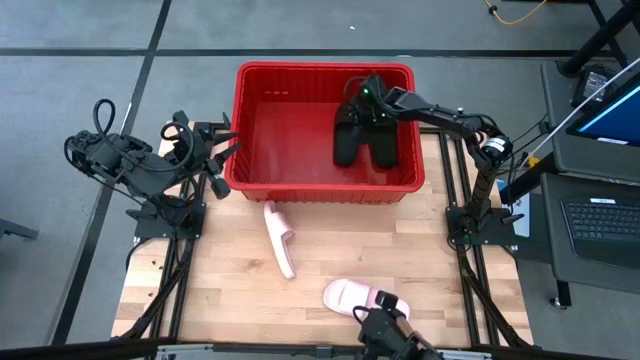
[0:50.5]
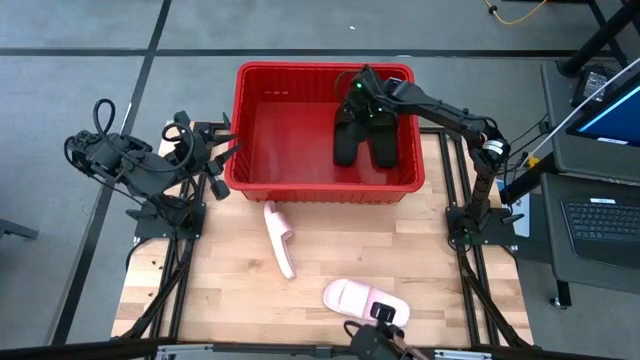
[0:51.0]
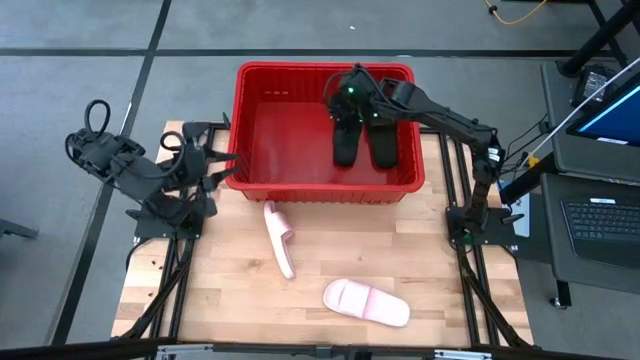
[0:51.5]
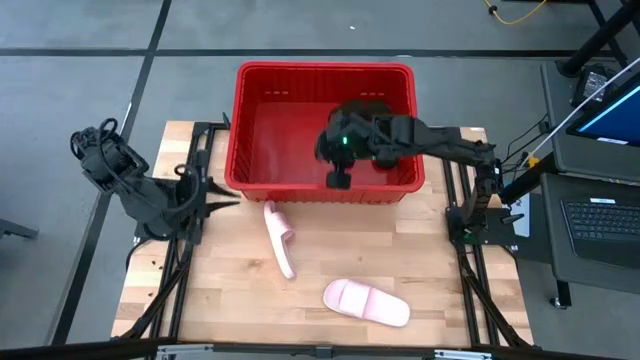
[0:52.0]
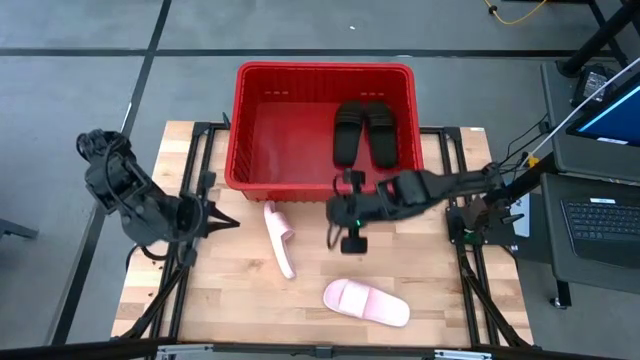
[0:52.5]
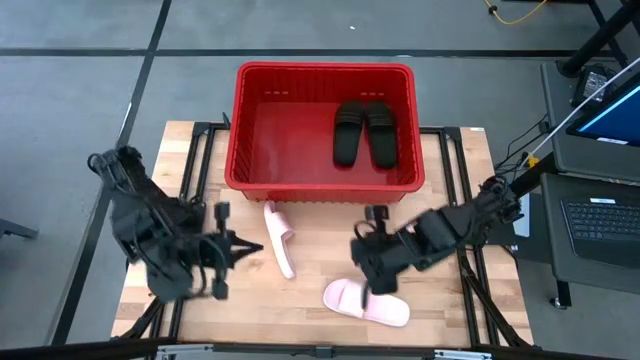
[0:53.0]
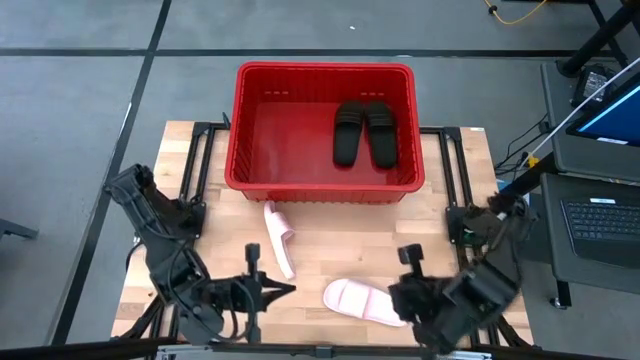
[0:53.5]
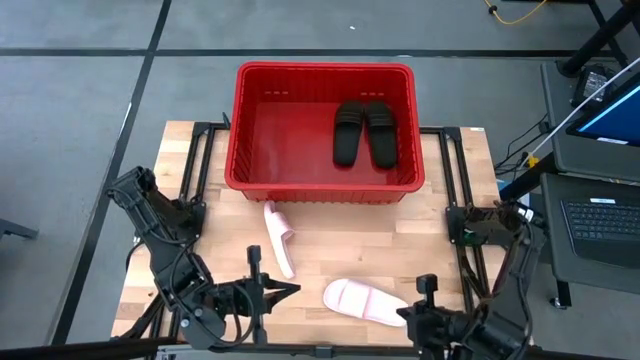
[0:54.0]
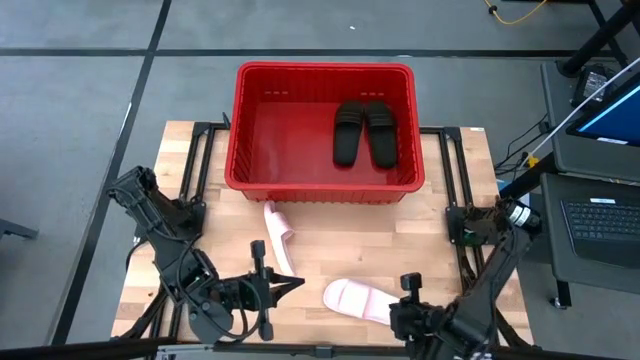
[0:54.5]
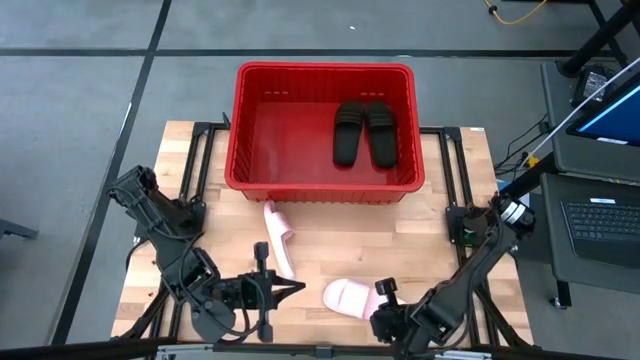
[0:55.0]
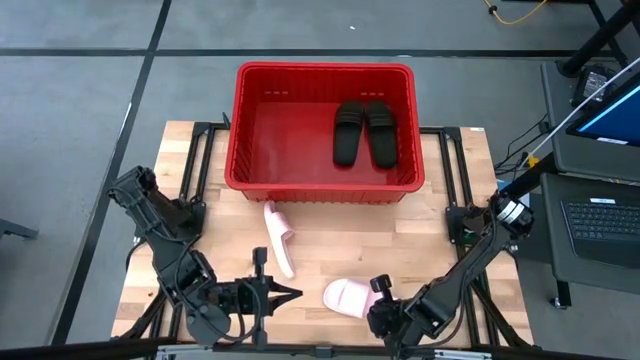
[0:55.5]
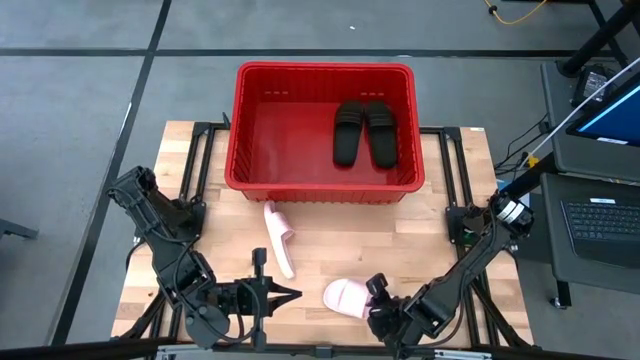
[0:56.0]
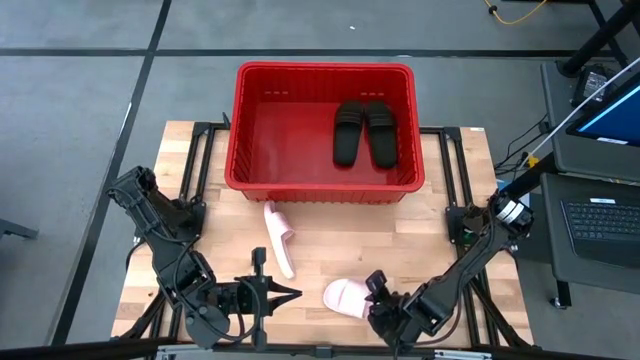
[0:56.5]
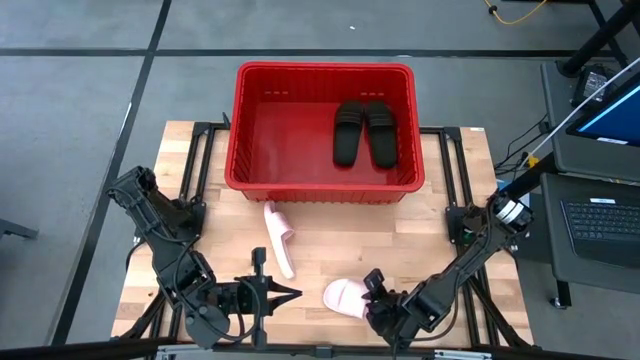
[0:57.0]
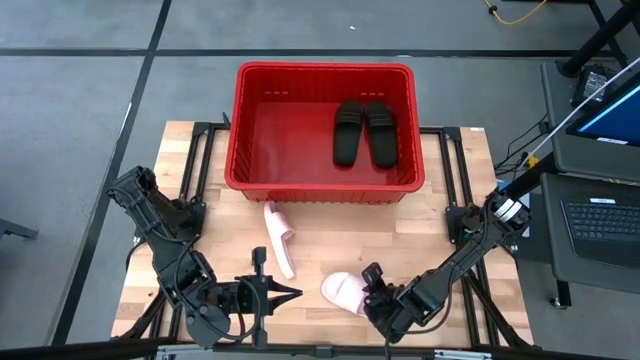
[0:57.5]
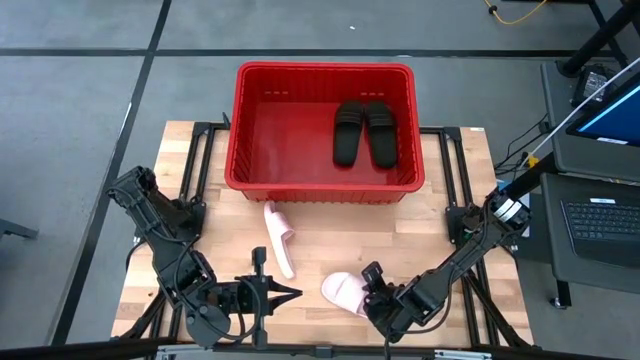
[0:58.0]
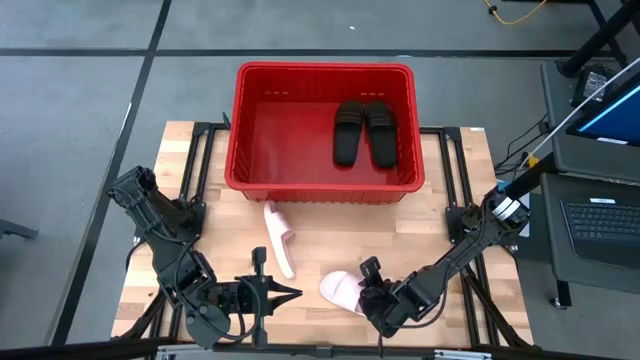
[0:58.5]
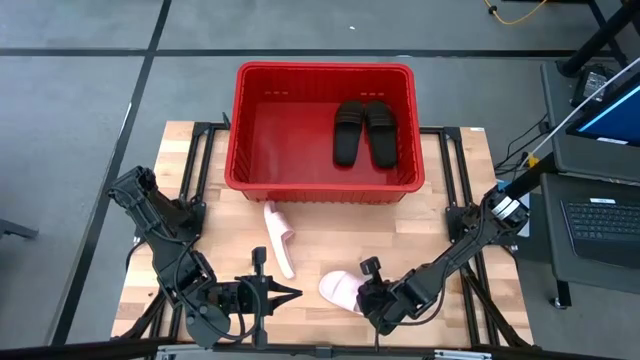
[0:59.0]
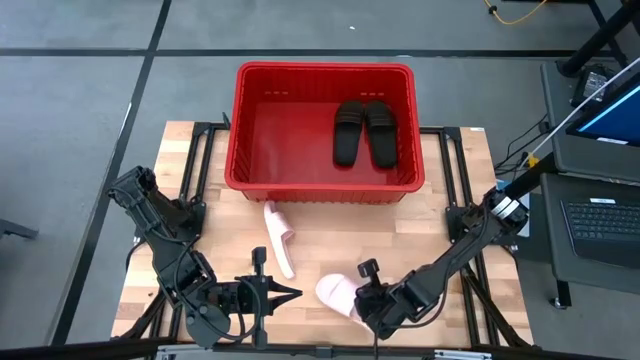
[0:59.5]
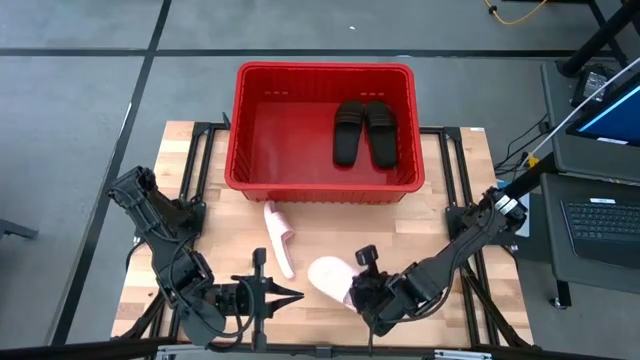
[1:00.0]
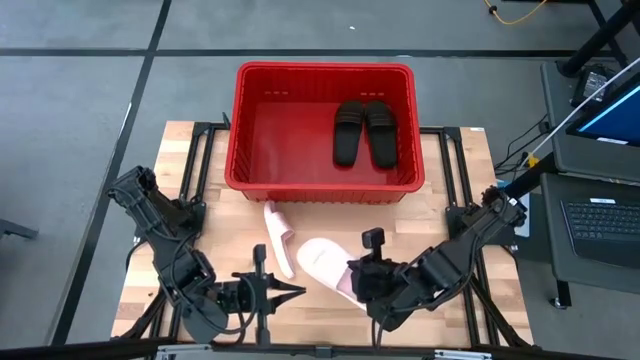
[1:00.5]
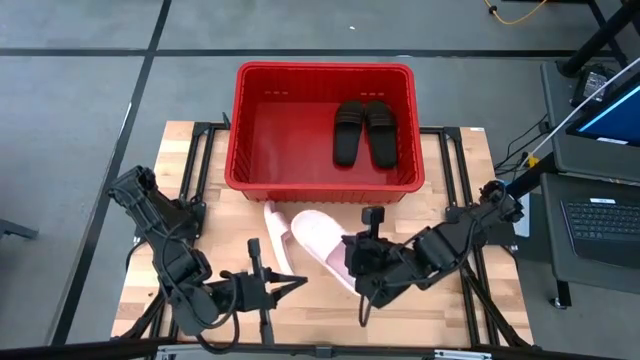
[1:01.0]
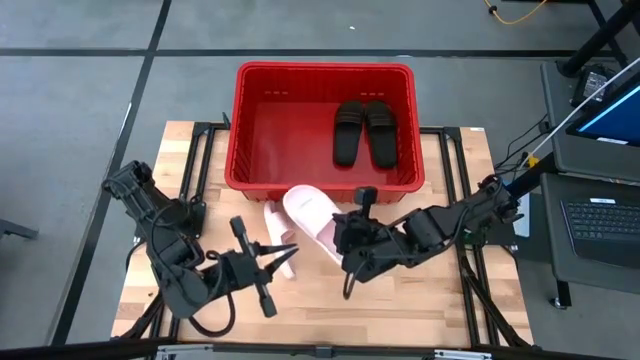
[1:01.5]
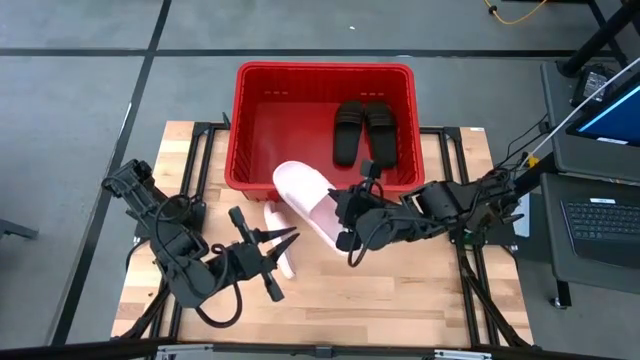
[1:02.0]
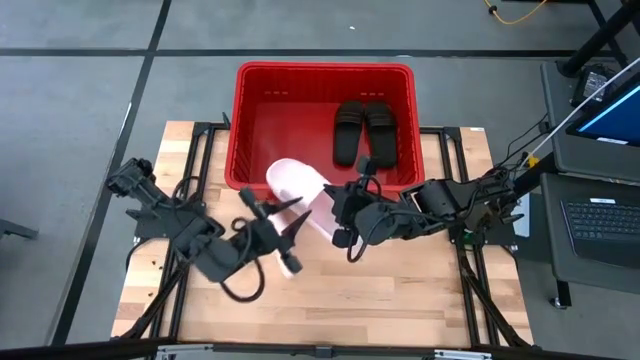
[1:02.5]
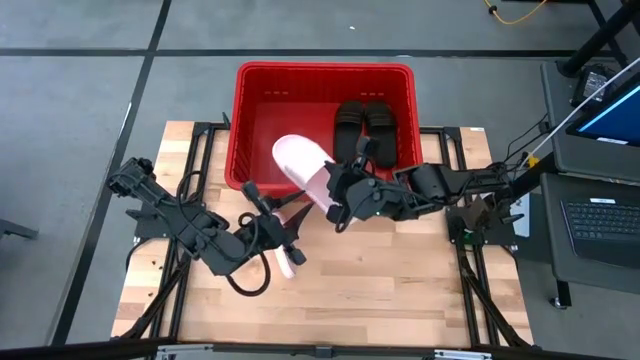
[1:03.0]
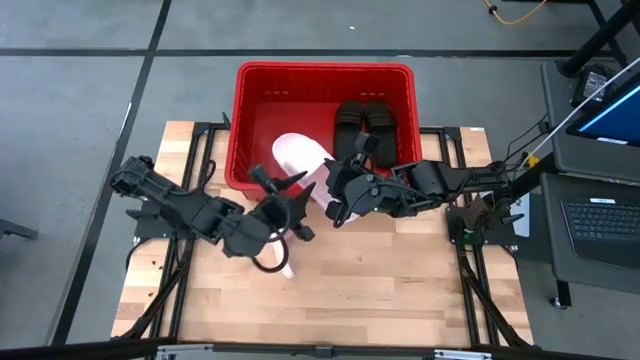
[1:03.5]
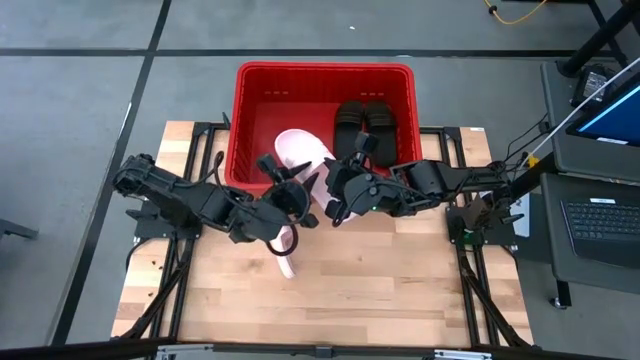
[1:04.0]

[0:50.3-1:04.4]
Task: Pick and place slides into bin
Put the right pink slide into the red bin

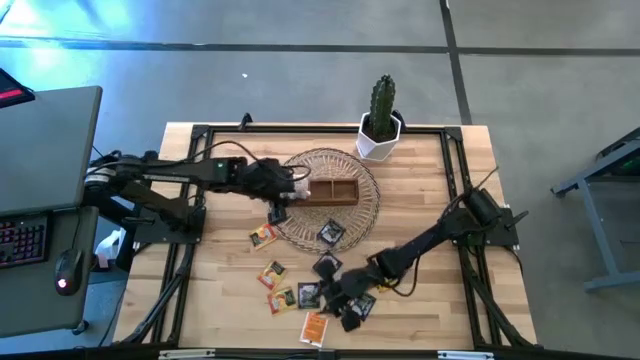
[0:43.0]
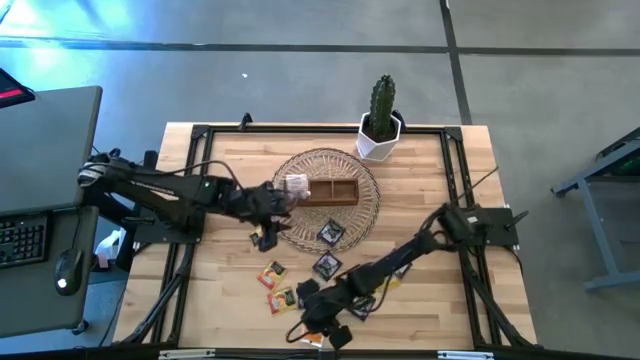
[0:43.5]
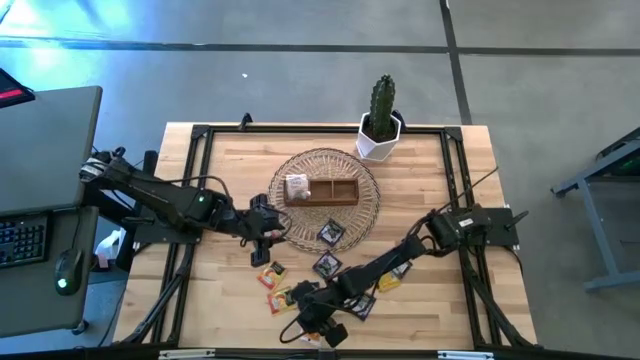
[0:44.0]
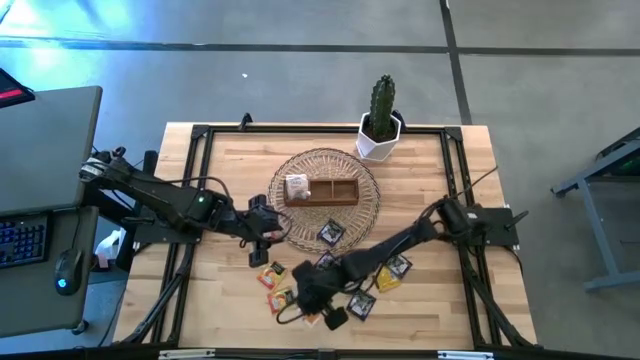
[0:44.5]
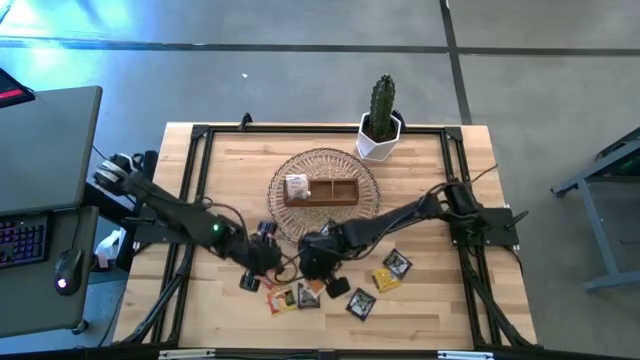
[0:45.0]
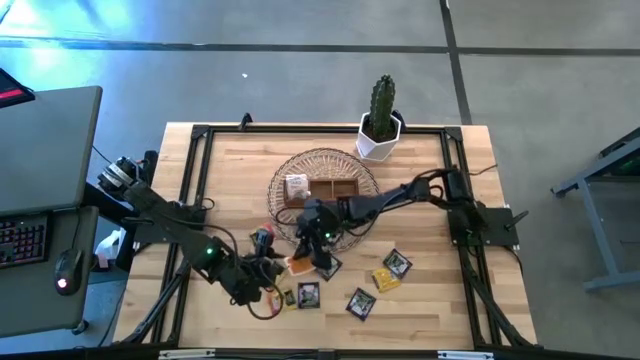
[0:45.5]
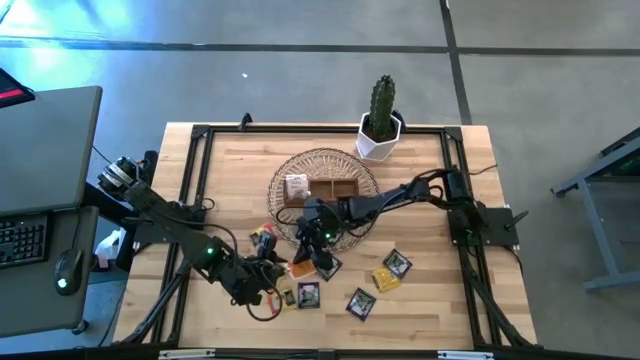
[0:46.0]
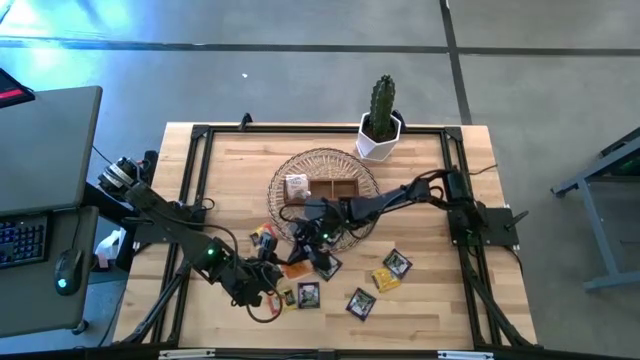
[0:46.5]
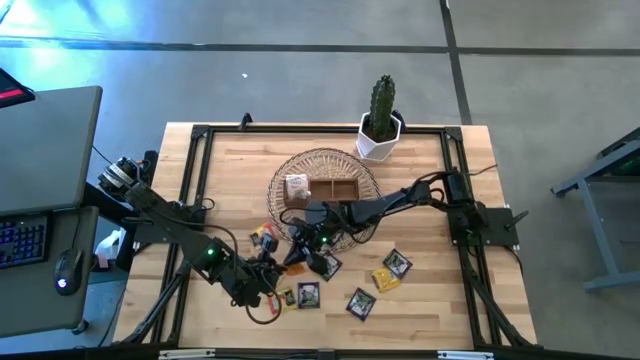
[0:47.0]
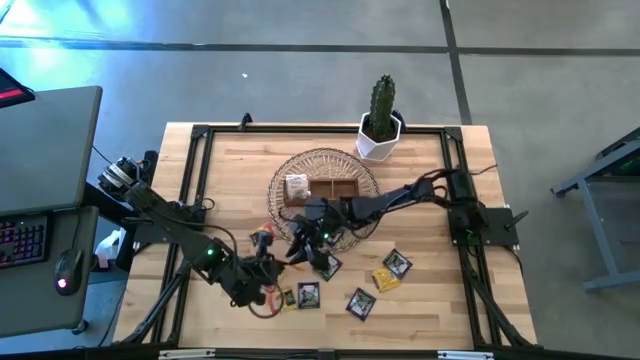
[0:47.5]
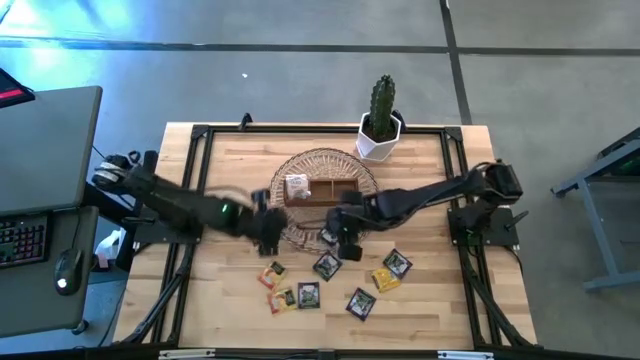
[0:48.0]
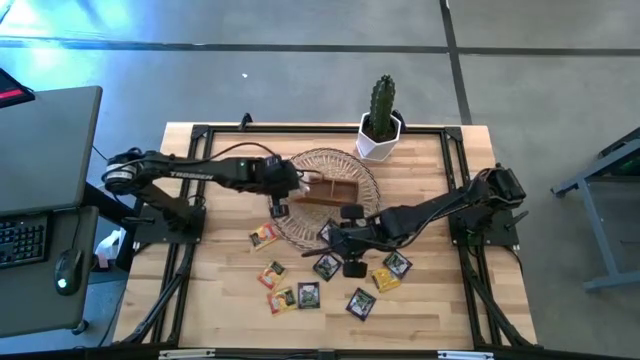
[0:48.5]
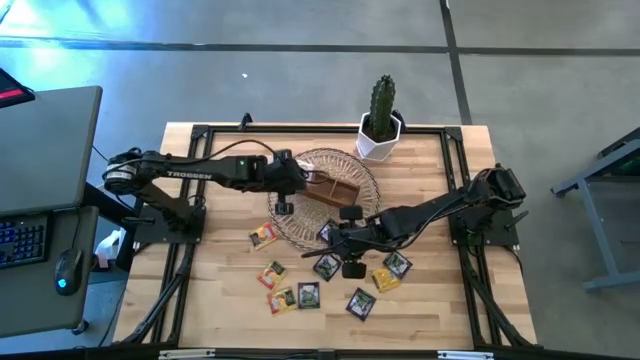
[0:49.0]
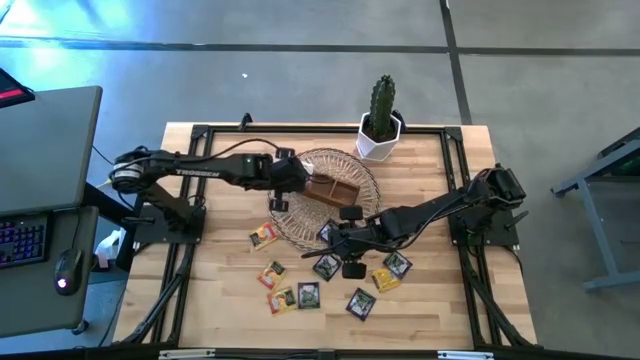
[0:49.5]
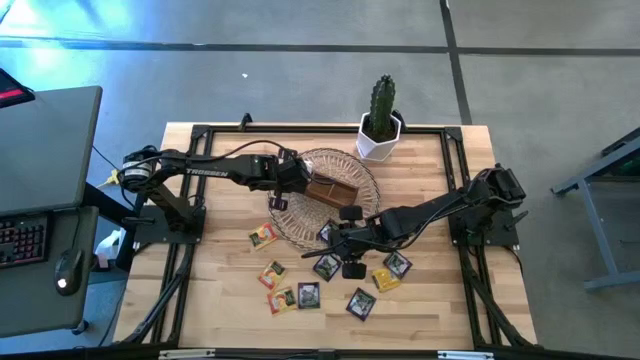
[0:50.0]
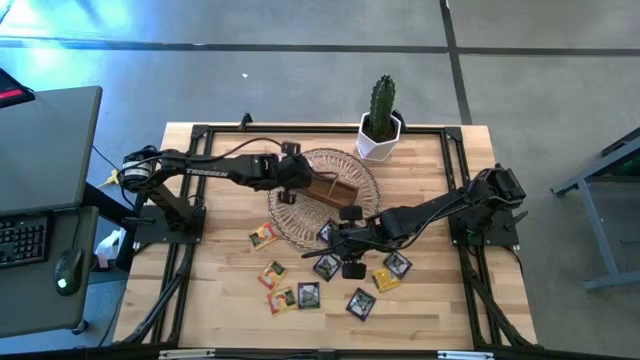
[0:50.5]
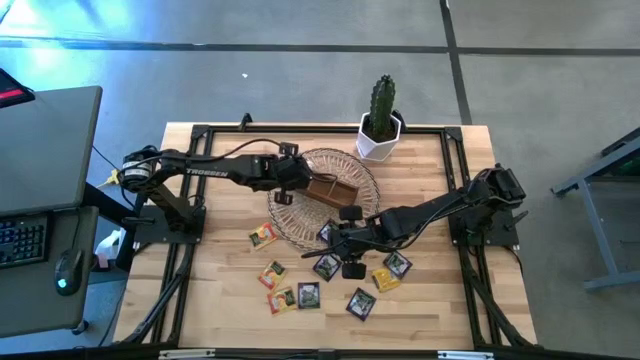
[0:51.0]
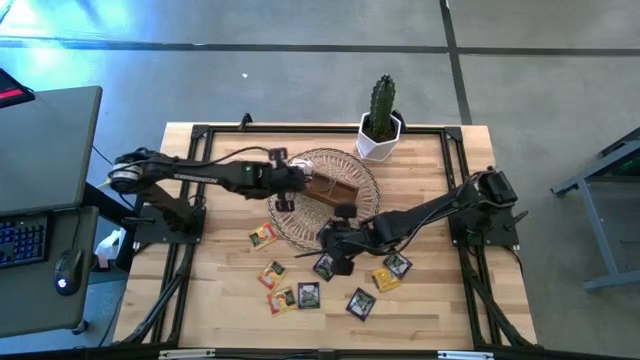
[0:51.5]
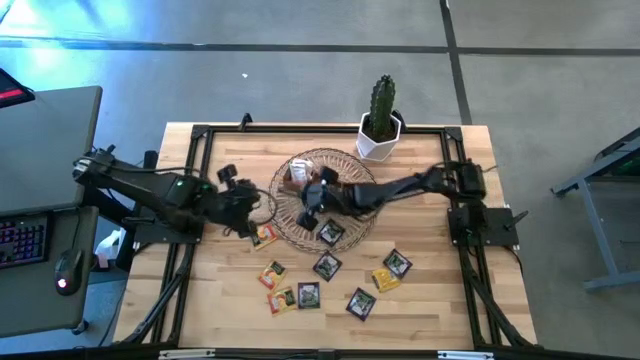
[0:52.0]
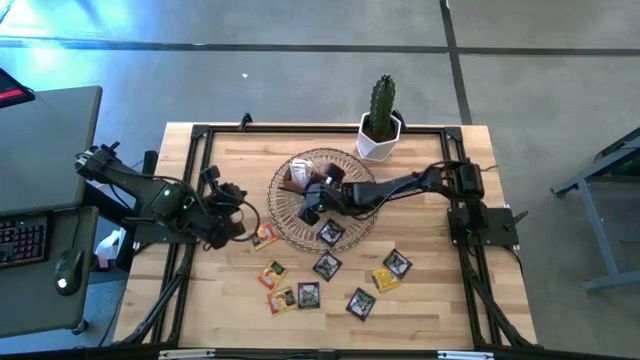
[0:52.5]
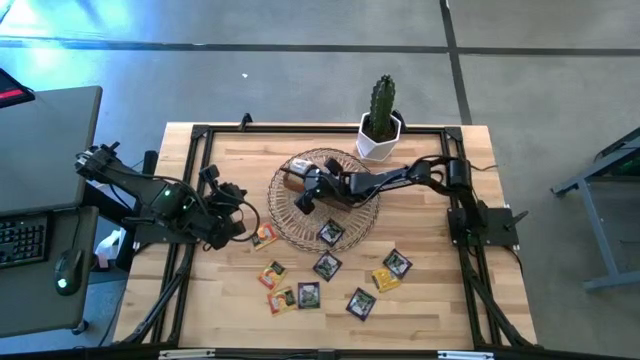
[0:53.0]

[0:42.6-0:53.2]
Task: Pick & Place Tea
Put the orange tea pack into the left section of the wooden organizer
